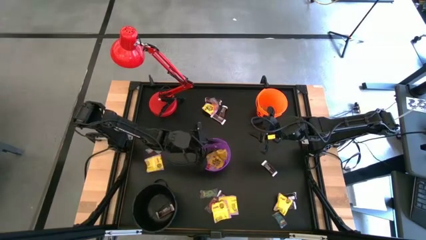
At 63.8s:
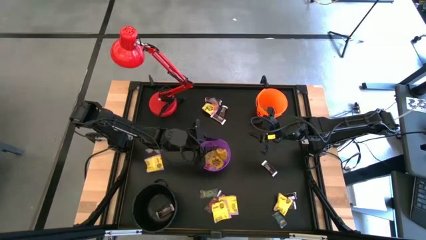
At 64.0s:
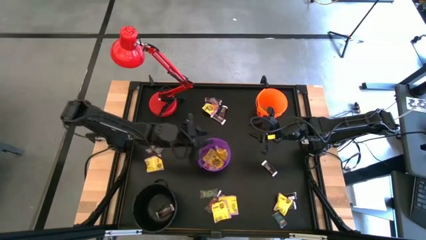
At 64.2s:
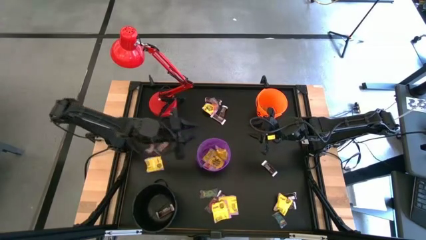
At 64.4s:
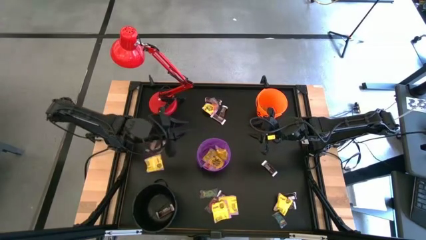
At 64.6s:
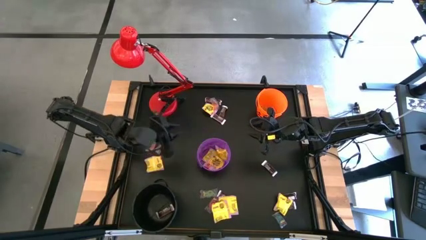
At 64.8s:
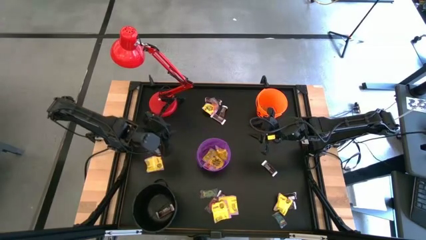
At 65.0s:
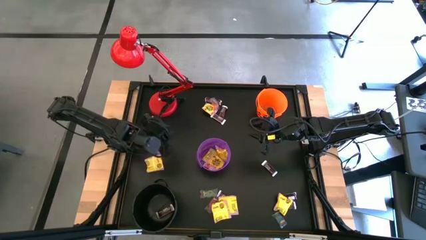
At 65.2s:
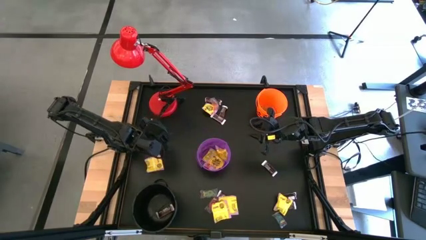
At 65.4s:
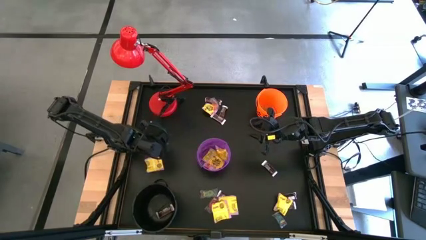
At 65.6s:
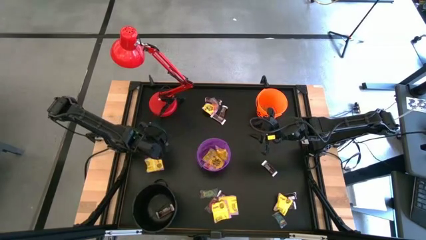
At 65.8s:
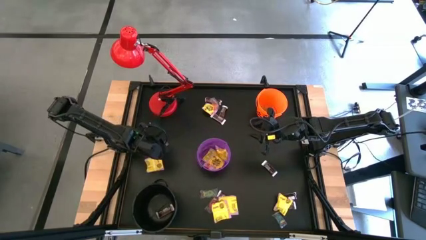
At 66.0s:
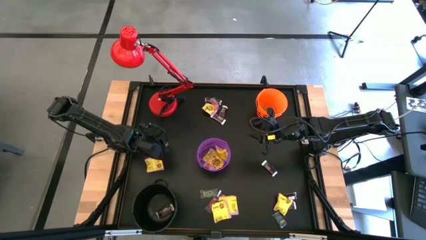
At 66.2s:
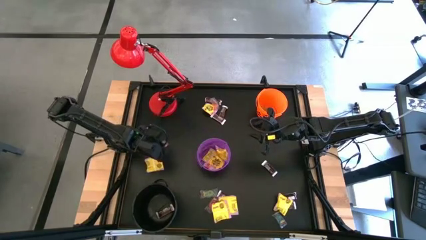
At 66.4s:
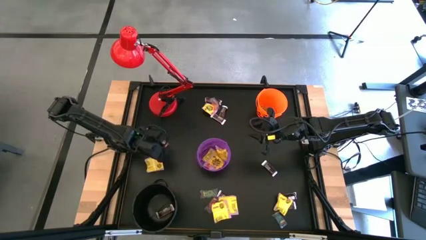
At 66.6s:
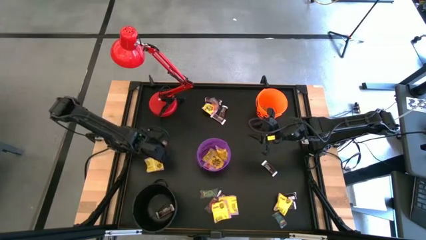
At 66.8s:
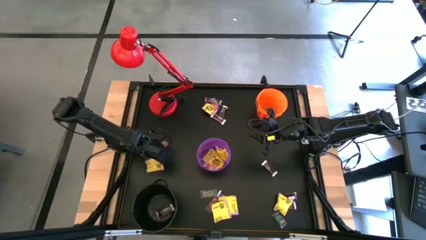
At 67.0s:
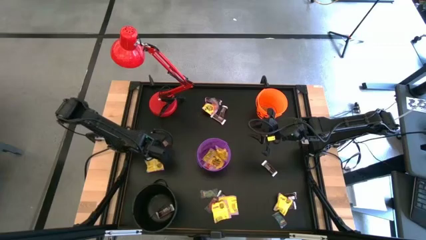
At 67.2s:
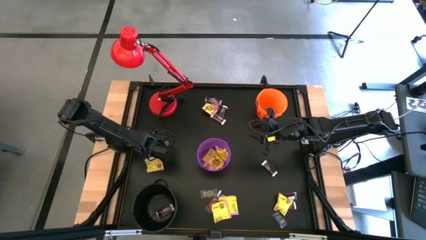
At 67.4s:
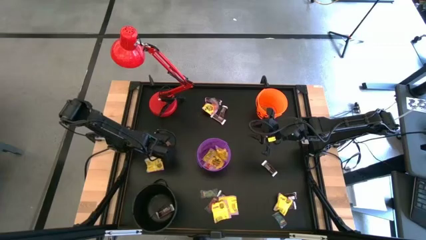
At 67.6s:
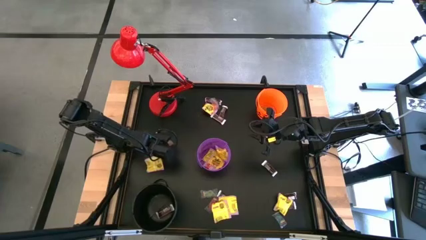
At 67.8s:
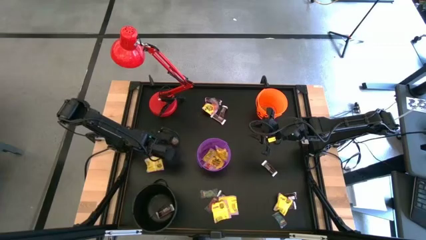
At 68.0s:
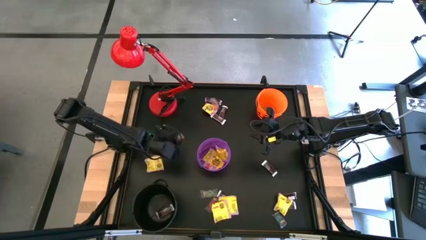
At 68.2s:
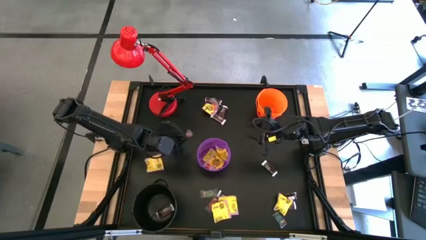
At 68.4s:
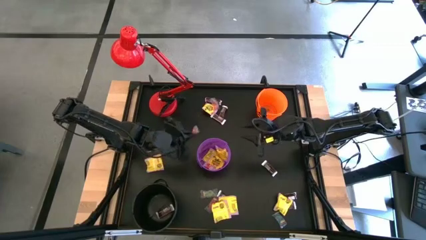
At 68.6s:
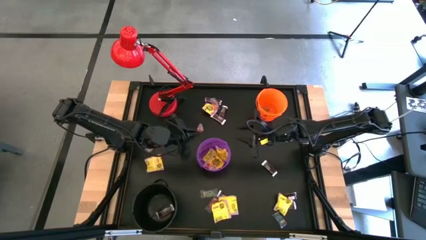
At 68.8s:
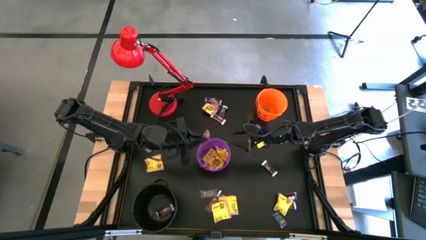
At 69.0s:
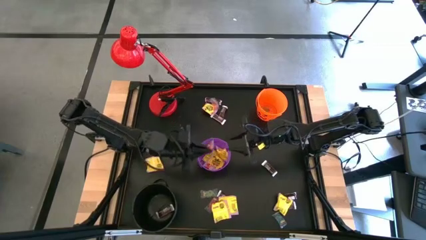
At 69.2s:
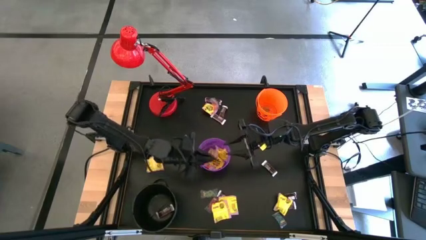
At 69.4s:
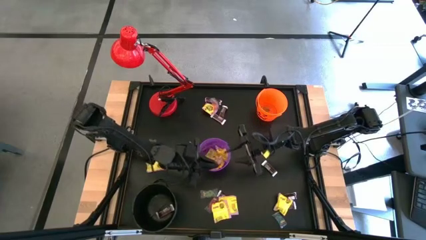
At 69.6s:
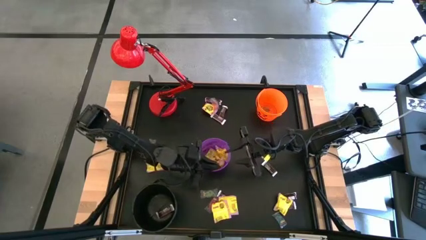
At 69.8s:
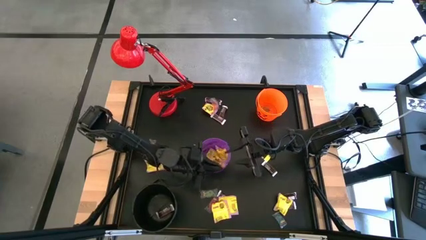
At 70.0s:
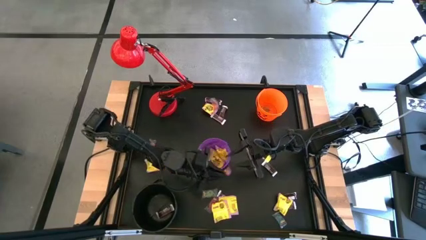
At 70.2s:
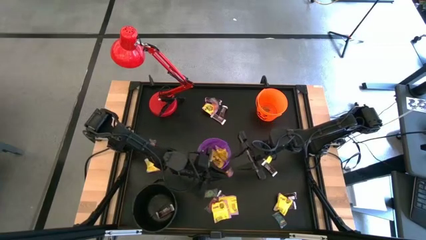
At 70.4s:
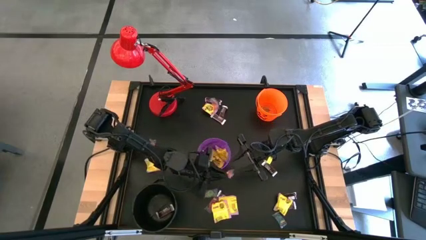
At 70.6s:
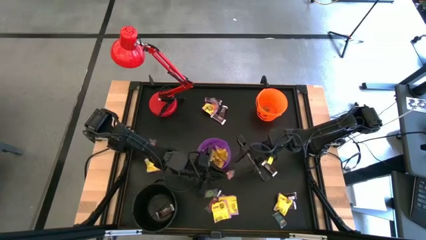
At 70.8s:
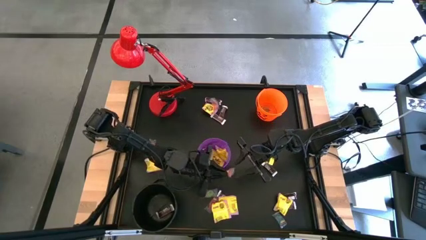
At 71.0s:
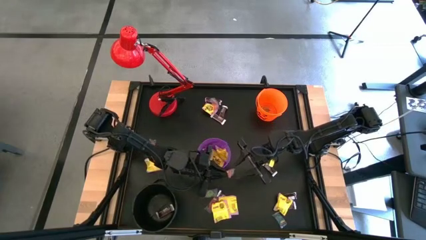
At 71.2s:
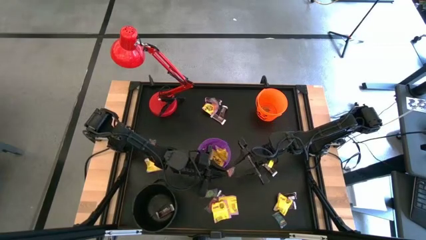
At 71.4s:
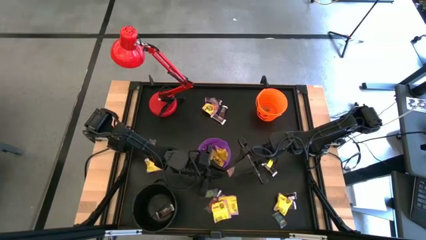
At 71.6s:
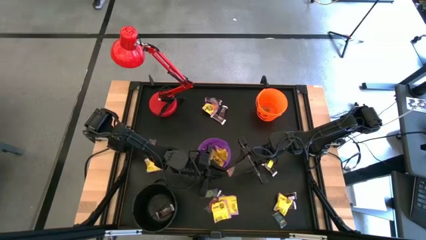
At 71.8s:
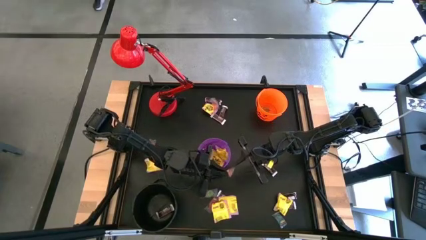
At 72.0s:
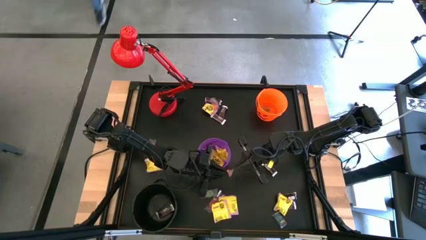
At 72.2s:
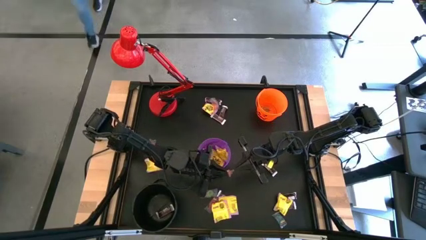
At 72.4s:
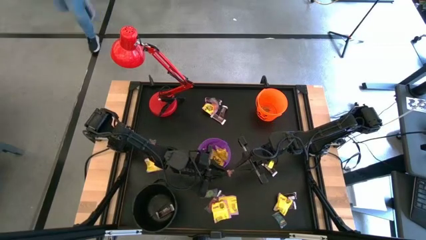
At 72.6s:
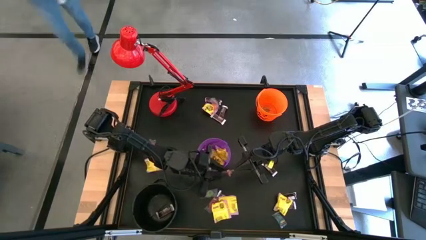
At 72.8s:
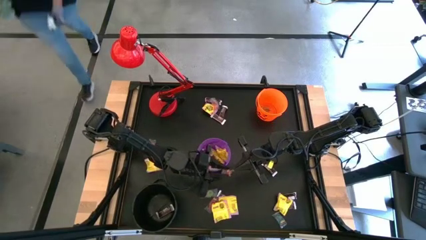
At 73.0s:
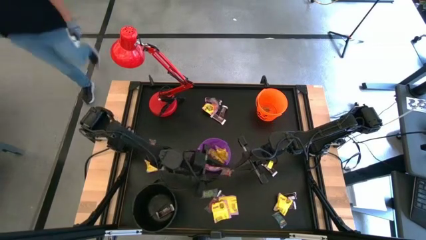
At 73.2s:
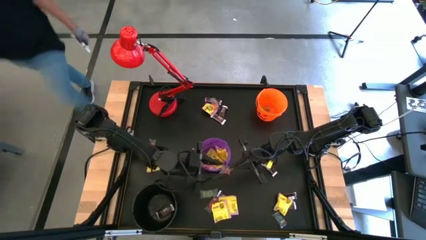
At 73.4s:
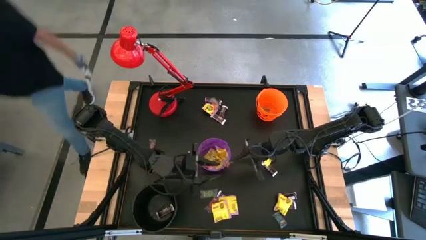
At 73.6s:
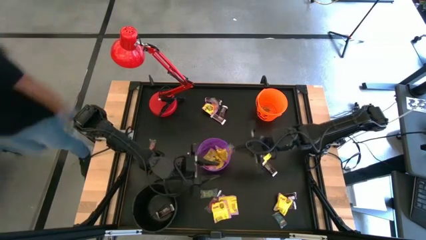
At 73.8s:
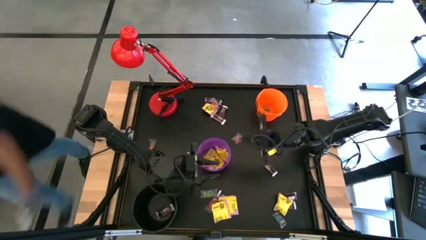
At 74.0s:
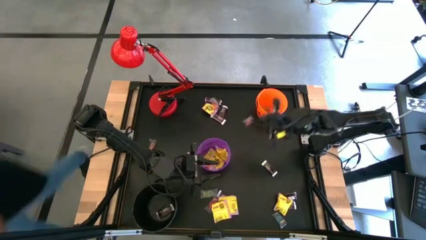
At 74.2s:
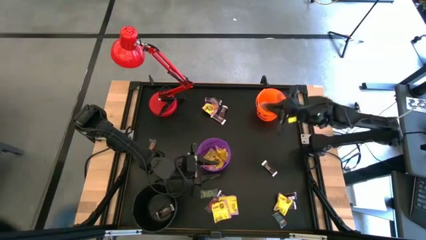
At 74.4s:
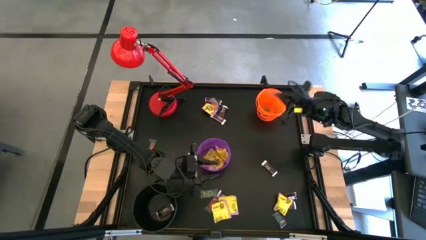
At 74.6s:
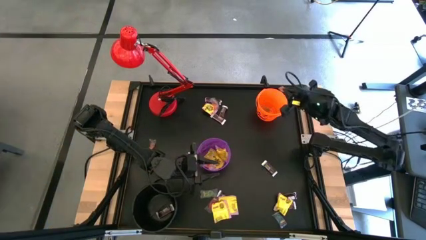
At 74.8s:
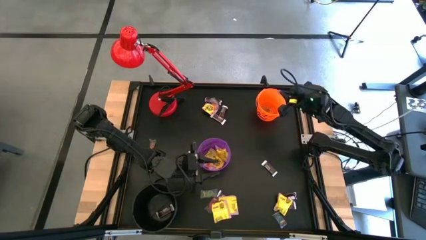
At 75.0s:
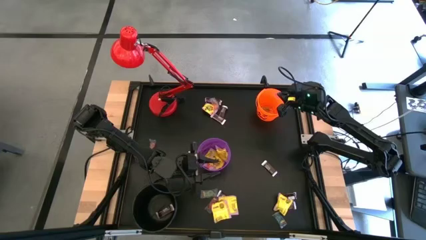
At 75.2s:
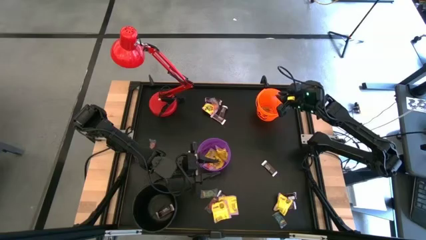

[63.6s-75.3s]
Task: Sort candy
Put the orange gummy into the orange bucket

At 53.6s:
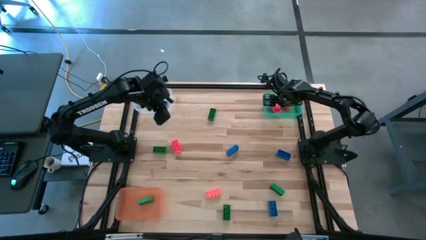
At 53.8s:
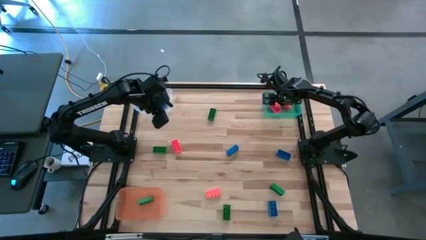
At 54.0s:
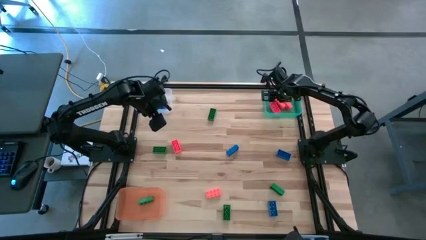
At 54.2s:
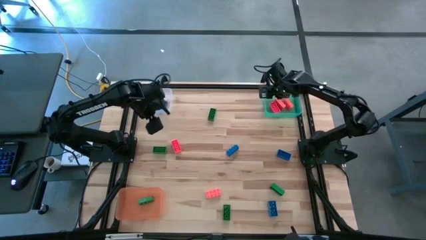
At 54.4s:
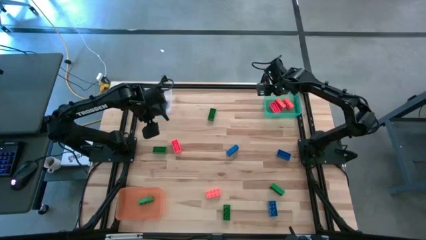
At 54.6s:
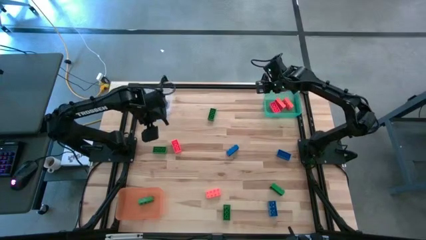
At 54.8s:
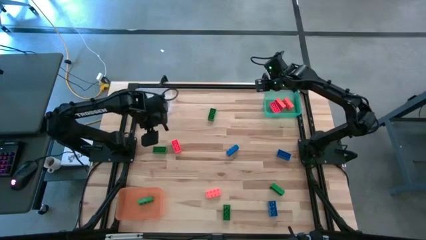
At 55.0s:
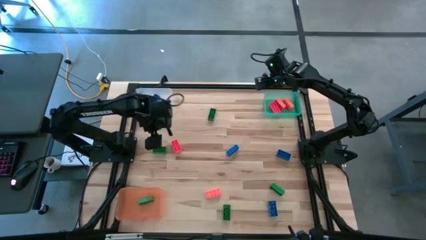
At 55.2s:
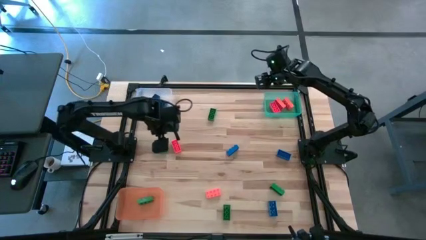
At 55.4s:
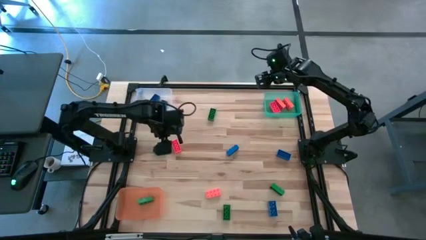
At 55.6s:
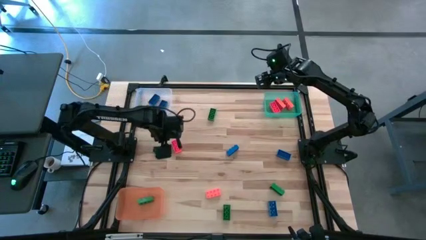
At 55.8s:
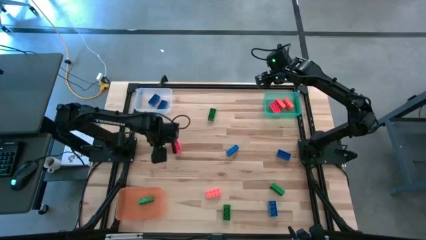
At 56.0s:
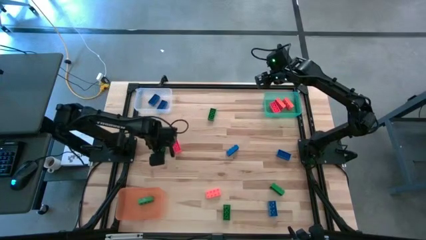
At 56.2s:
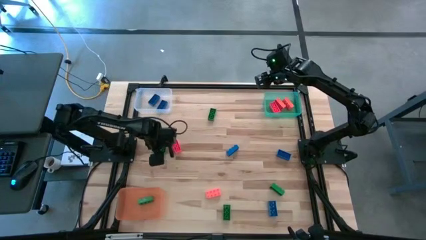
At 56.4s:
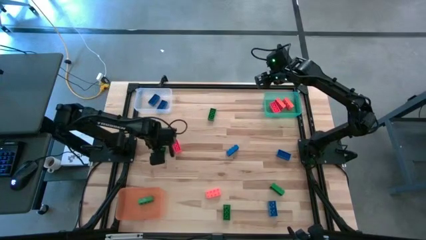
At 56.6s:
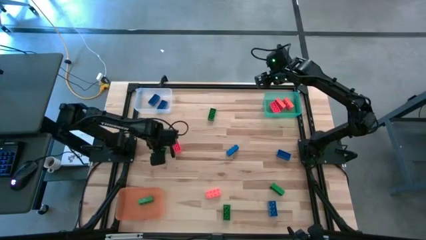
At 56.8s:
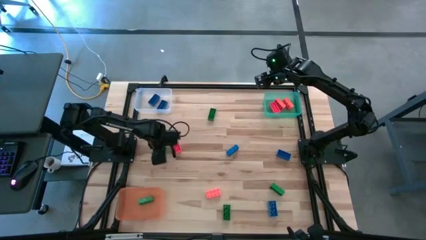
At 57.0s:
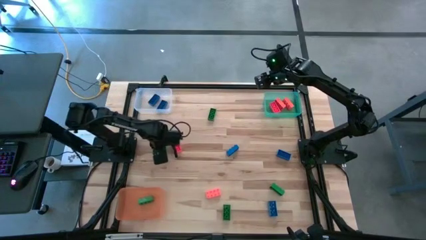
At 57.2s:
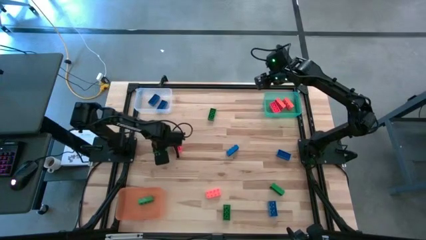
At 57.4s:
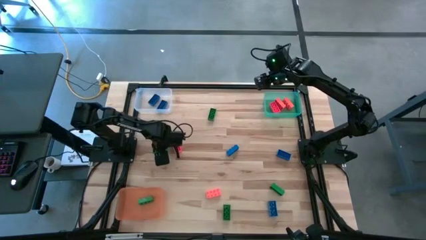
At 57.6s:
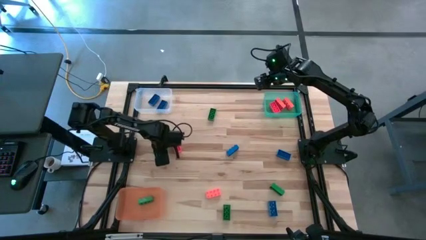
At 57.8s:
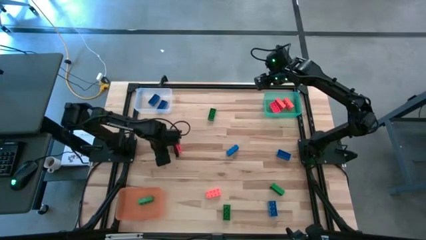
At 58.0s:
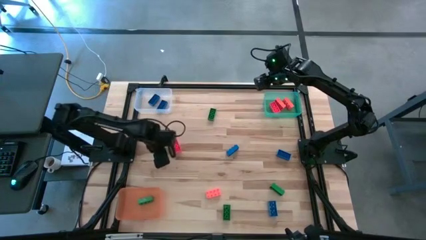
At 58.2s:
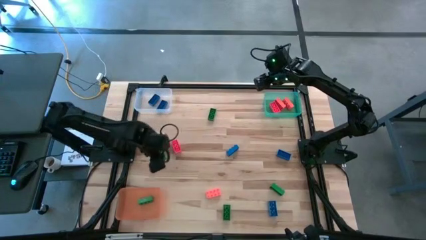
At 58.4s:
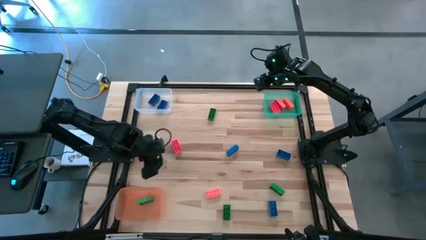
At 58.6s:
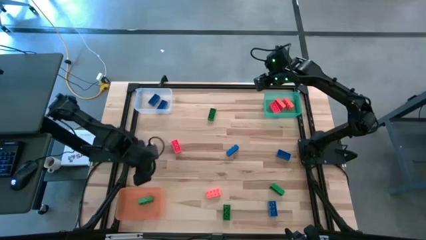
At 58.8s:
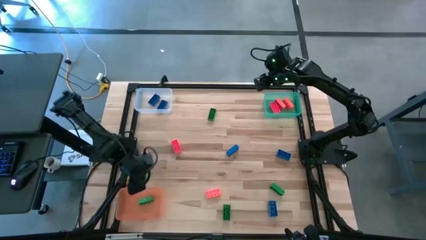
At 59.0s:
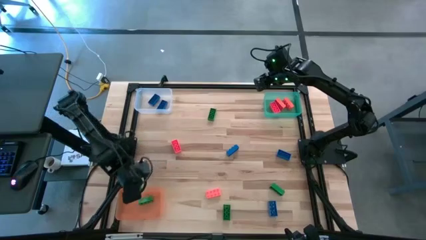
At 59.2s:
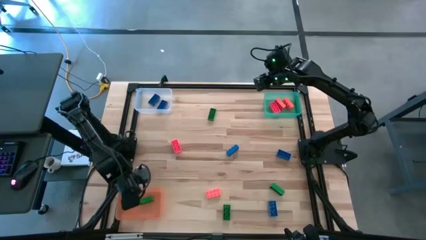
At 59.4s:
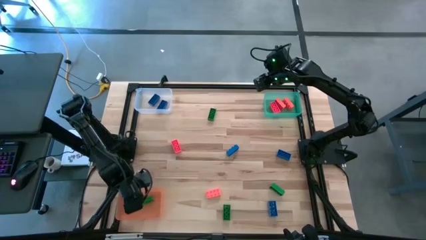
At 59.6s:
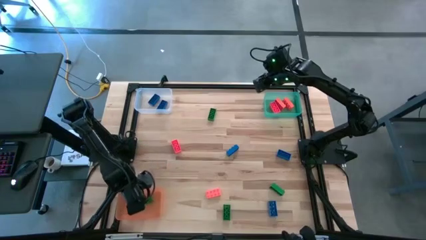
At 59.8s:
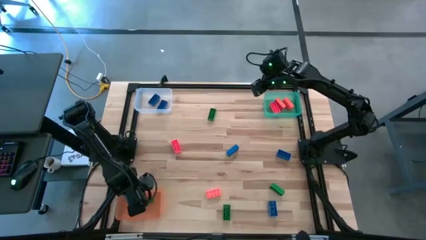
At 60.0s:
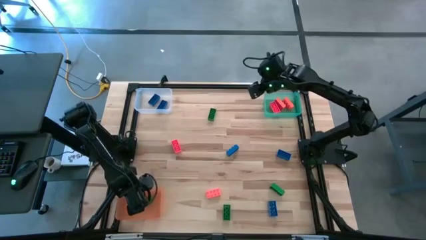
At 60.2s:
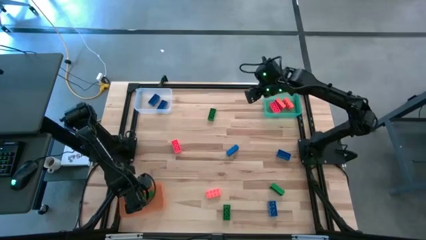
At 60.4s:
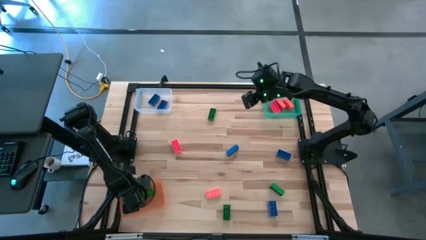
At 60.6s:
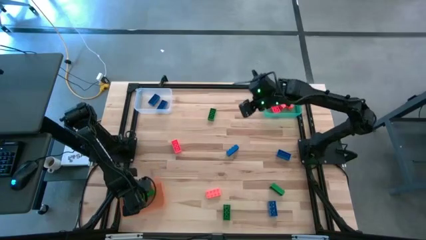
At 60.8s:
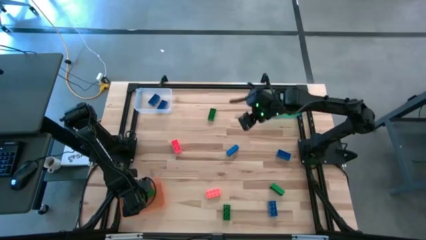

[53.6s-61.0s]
Task: Sort & place blocks by color
Put the green game piece into the orange bin
